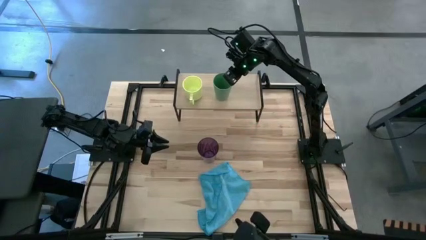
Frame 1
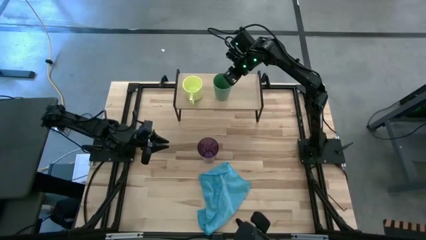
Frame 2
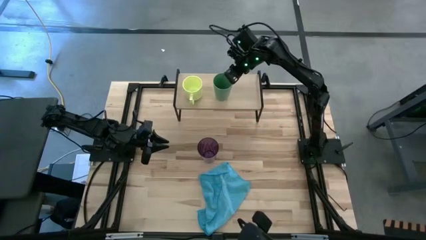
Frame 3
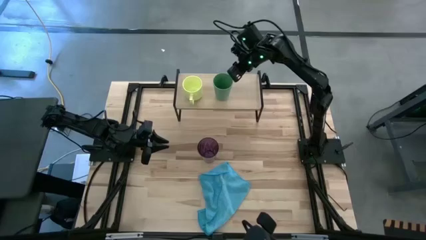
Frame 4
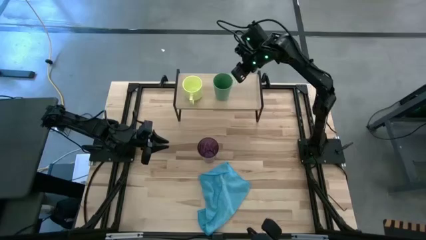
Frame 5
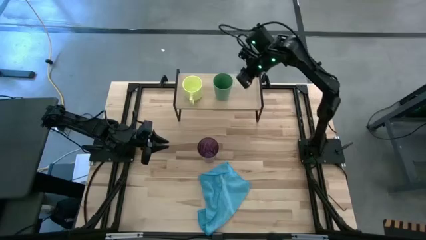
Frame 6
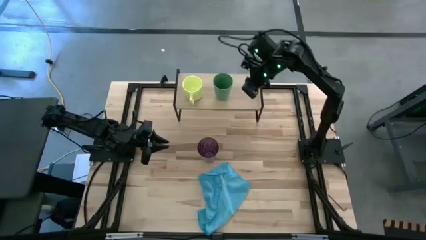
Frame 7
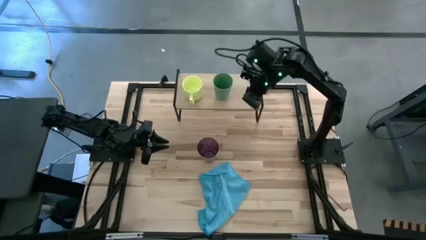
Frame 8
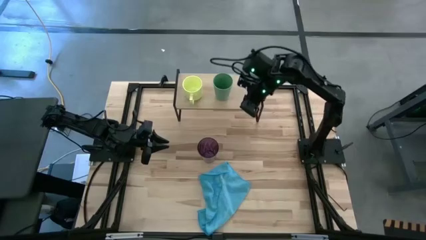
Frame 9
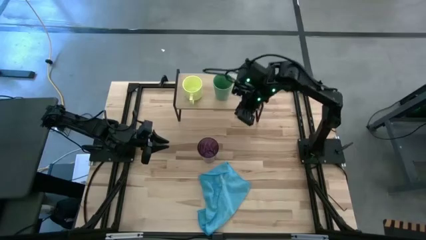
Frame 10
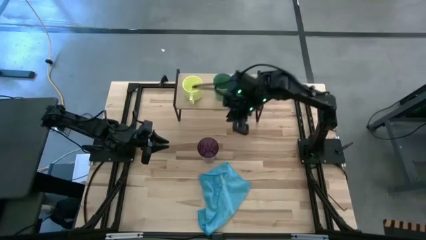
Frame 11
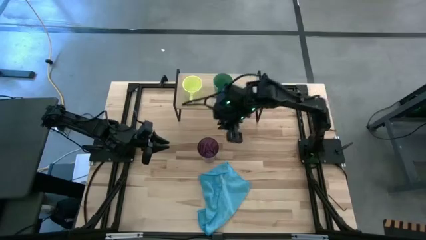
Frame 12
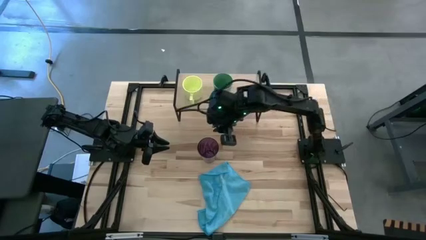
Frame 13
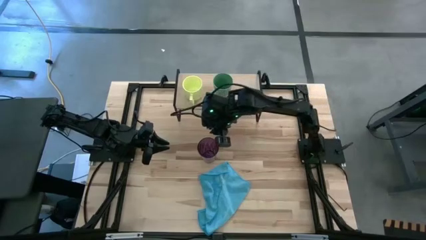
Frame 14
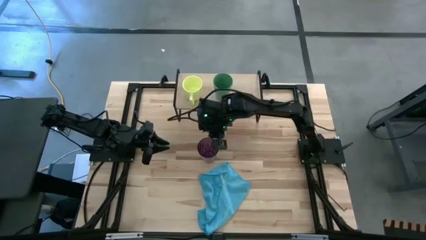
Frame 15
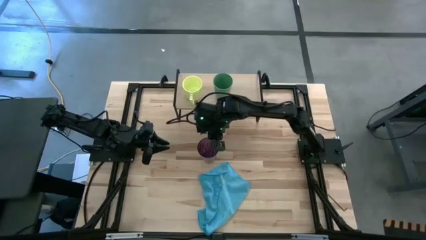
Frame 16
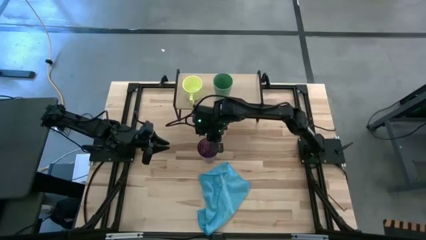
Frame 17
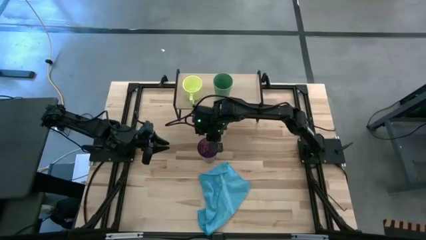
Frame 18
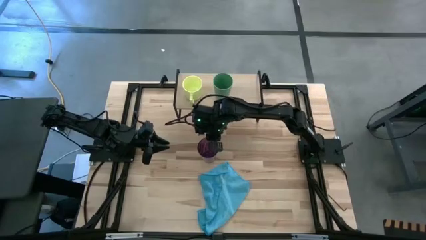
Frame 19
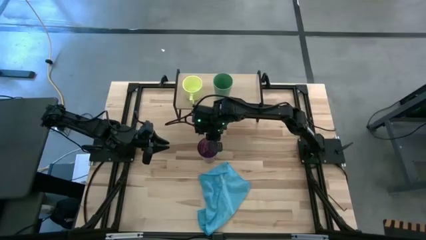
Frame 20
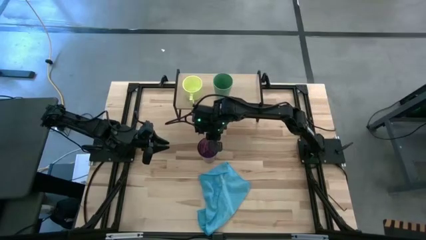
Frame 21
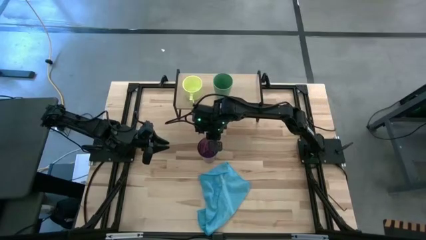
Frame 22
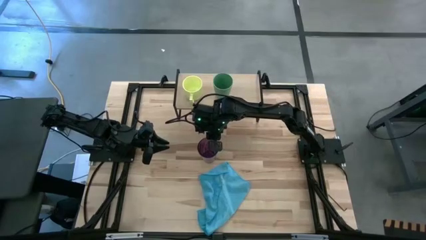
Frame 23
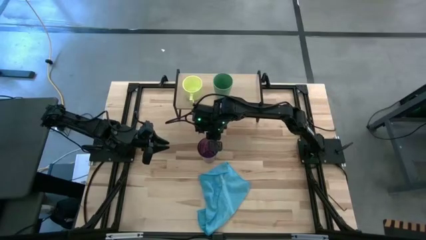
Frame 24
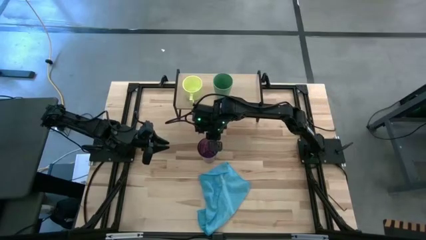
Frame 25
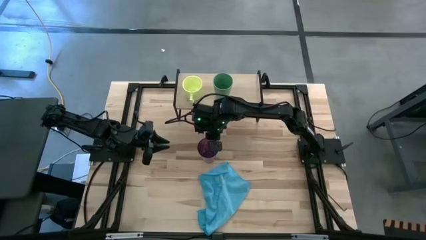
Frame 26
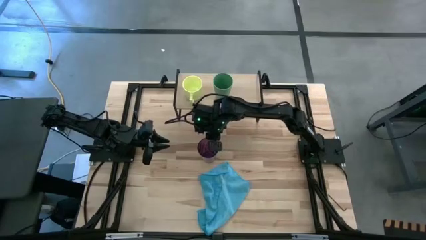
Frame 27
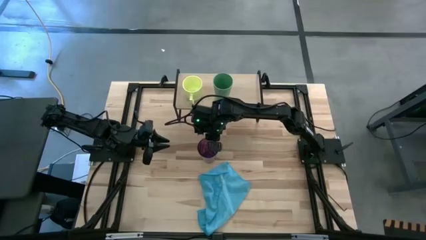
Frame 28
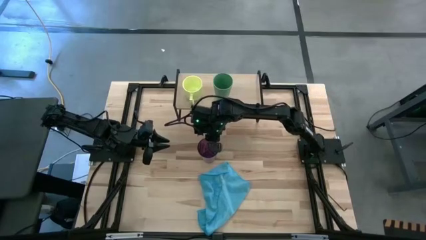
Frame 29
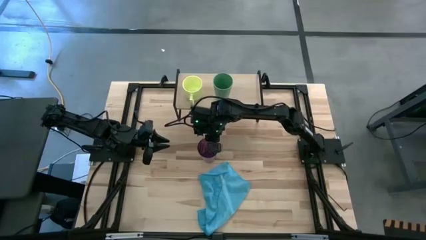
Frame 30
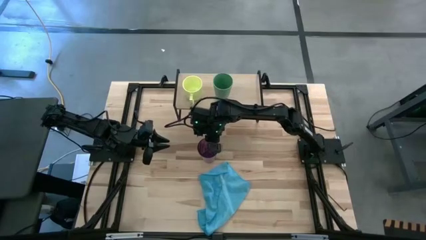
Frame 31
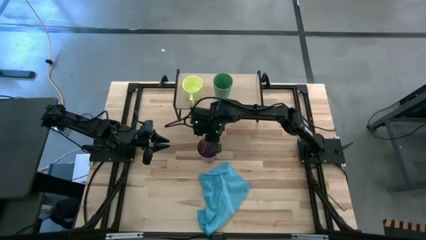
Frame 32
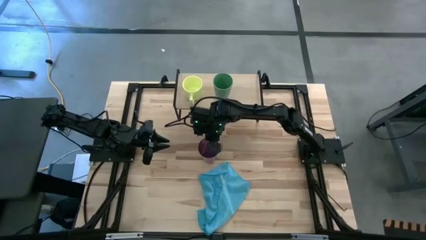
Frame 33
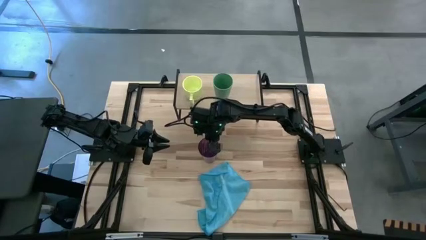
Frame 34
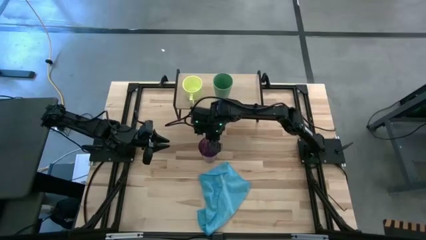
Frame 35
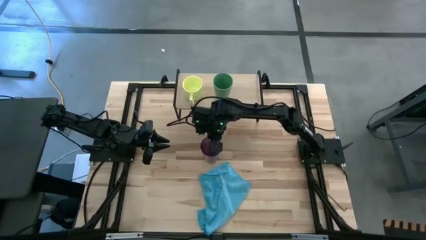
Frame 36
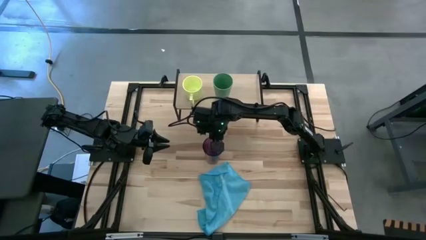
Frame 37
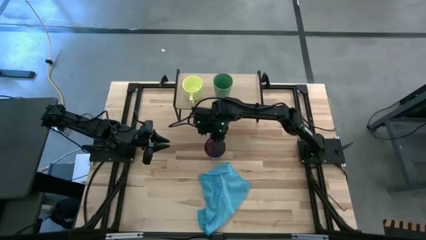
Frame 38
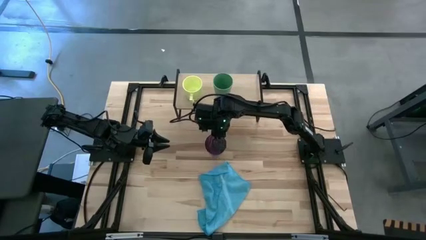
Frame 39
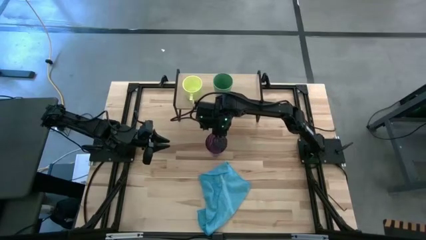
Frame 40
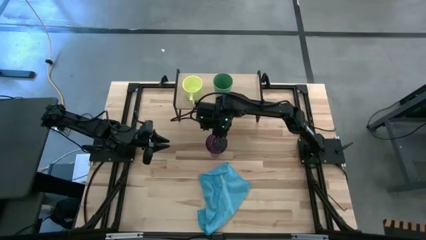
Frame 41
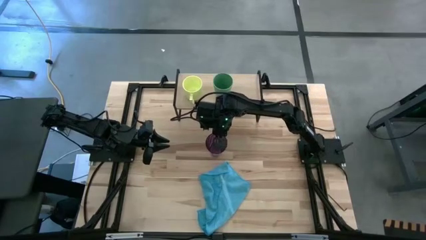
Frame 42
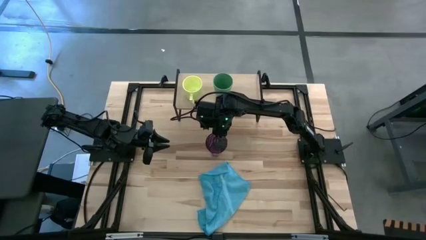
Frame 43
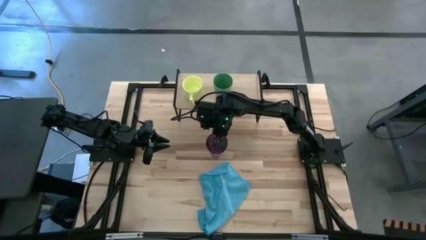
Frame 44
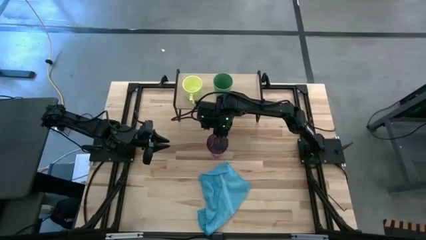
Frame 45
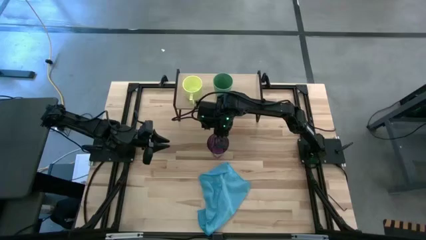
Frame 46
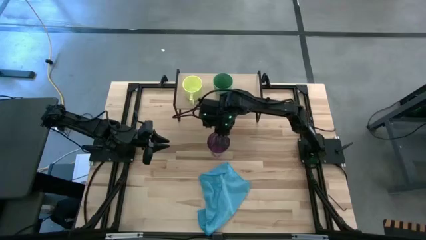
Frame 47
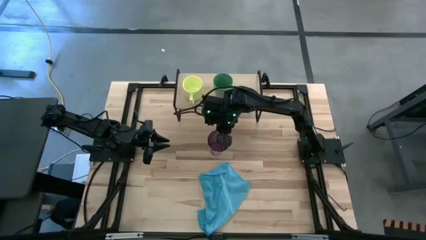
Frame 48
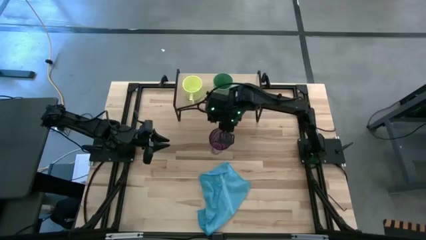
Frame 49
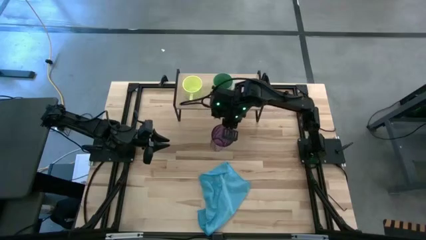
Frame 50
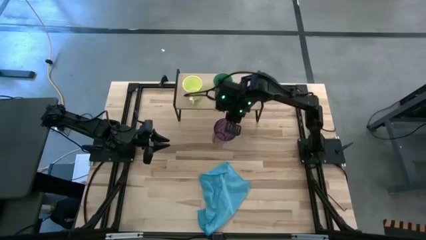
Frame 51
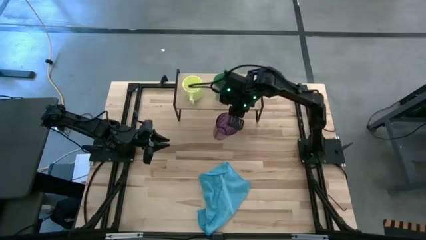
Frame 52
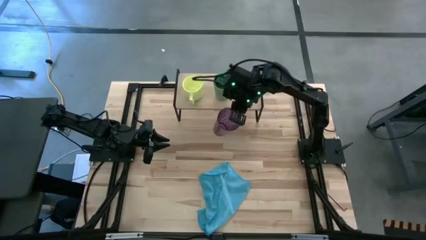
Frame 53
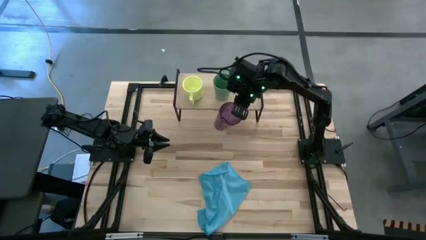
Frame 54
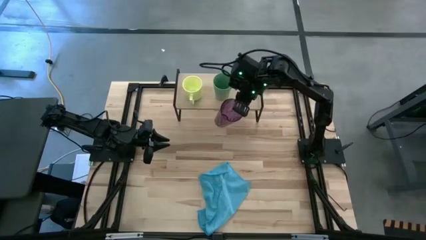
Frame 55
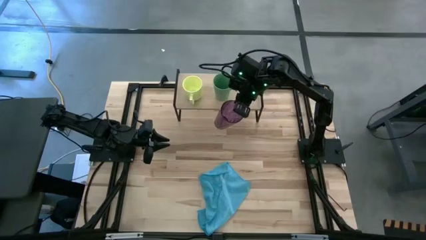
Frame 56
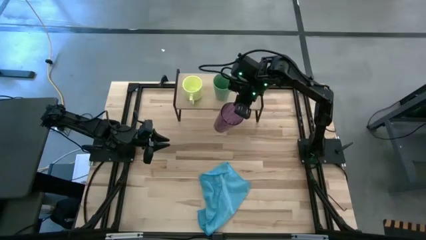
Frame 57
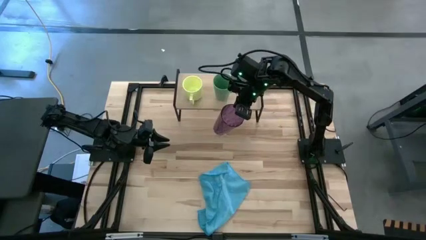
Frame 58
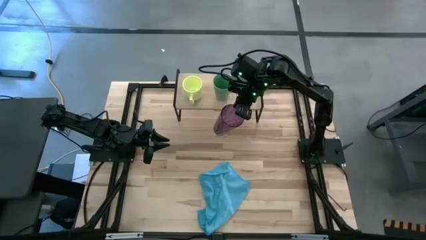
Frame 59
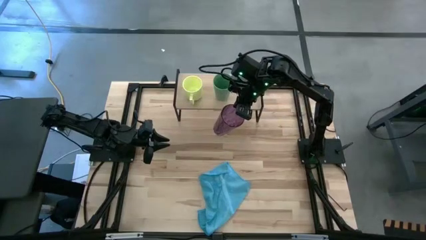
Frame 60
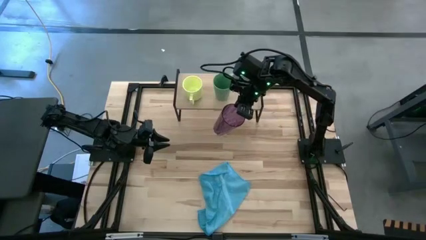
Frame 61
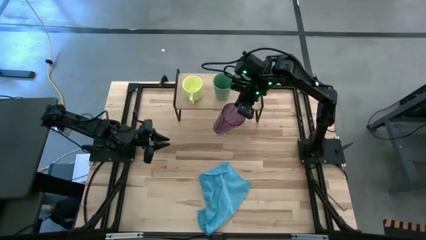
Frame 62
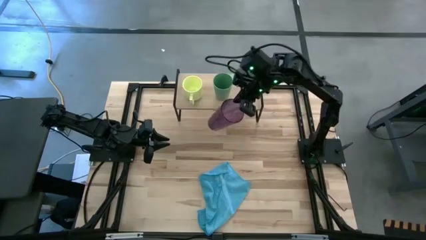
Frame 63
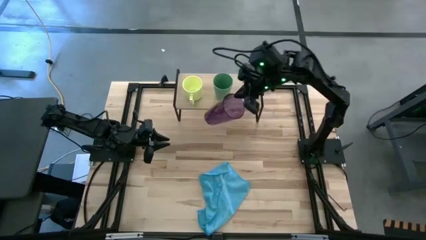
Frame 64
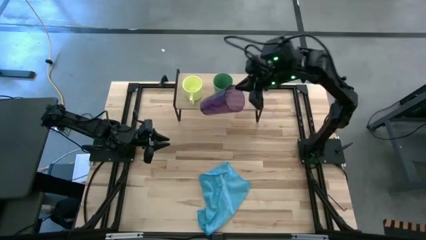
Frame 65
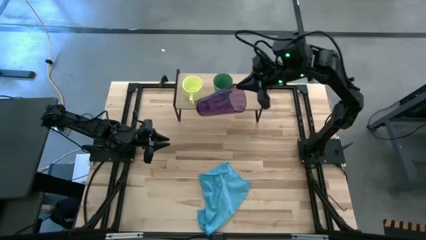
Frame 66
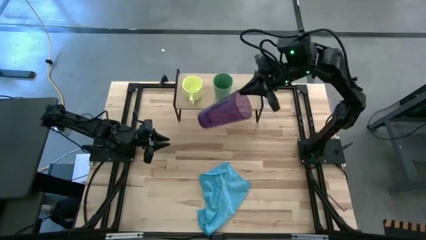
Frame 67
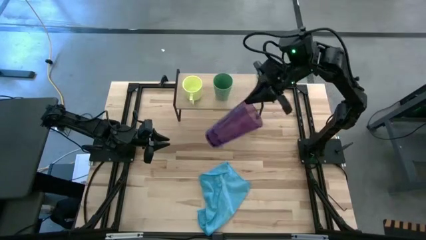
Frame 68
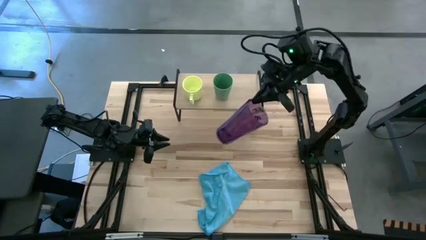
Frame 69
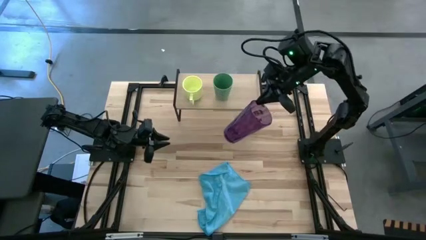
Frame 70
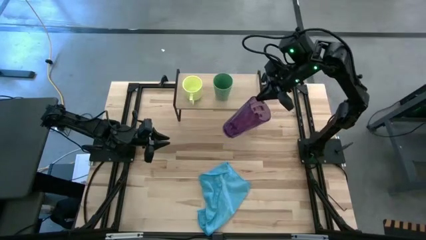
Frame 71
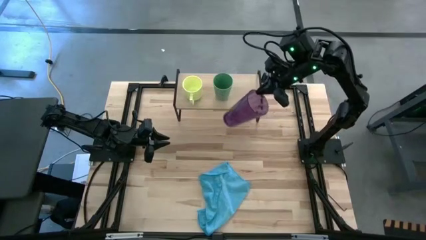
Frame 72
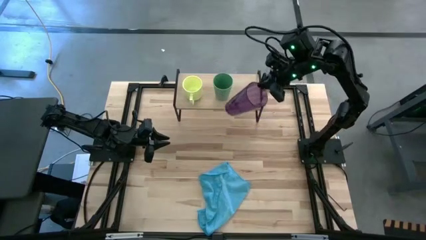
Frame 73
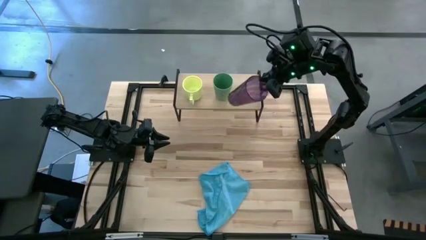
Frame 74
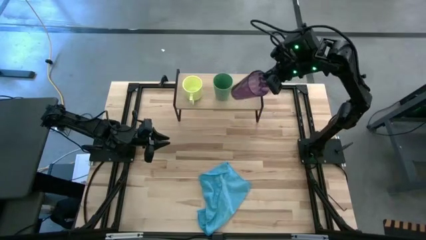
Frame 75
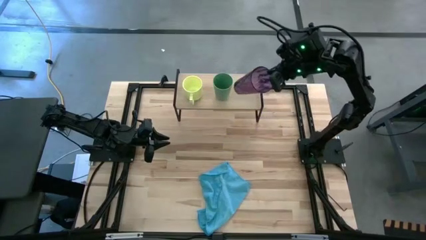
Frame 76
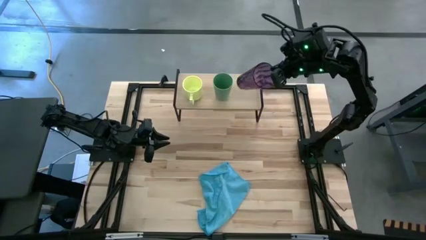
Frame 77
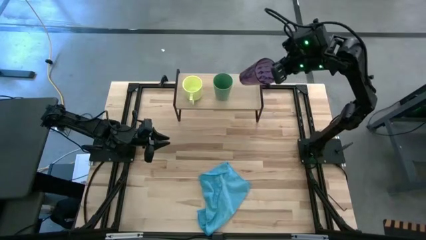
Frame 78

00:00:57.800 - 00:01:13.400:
Task: Stack small to large cups/mugs on shelf
Put the violet cup on the shelf
